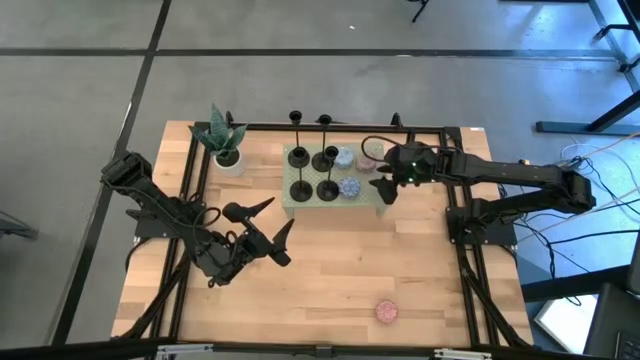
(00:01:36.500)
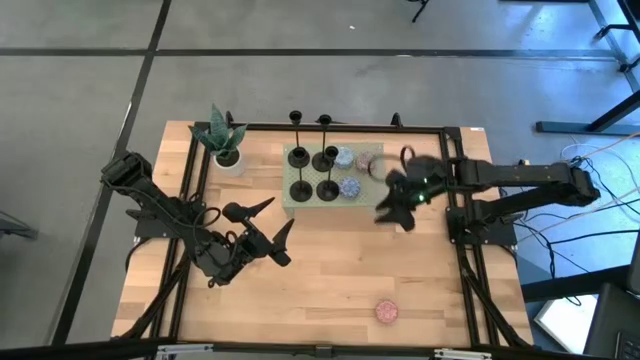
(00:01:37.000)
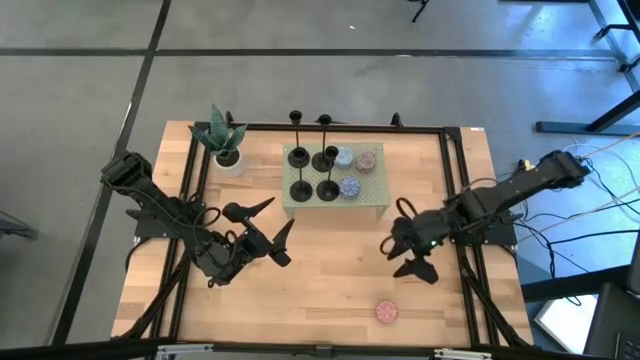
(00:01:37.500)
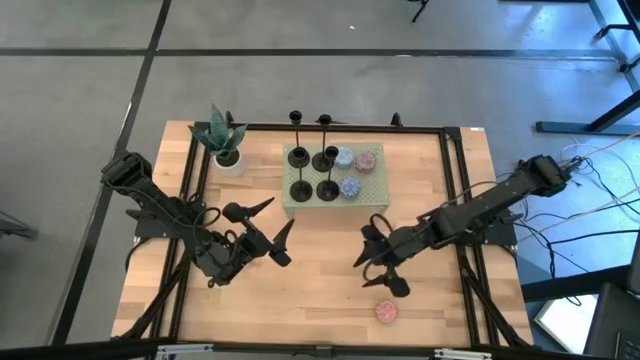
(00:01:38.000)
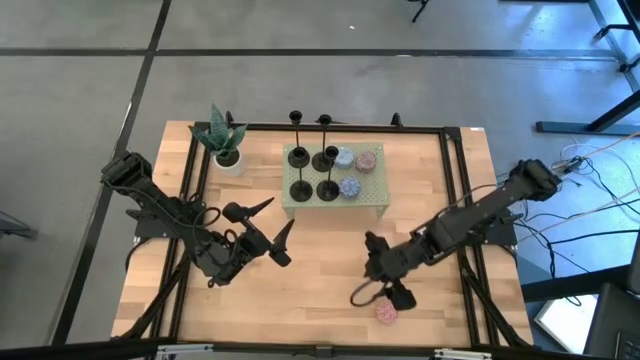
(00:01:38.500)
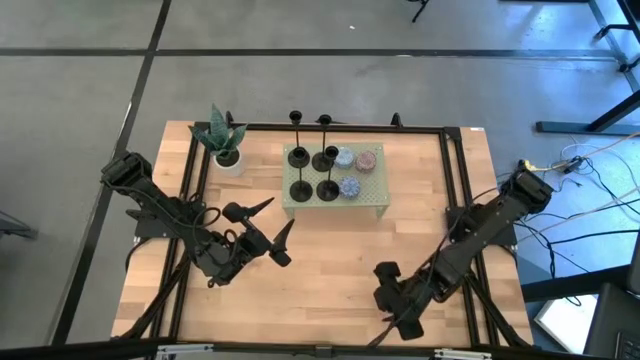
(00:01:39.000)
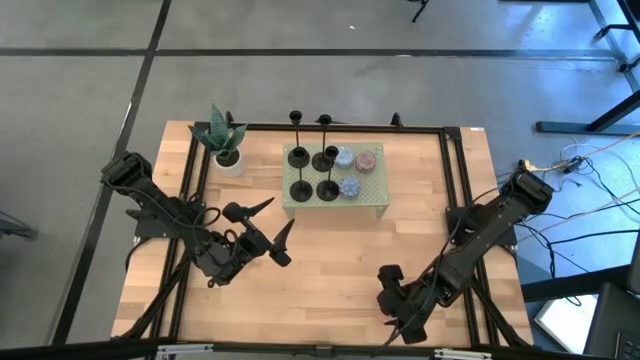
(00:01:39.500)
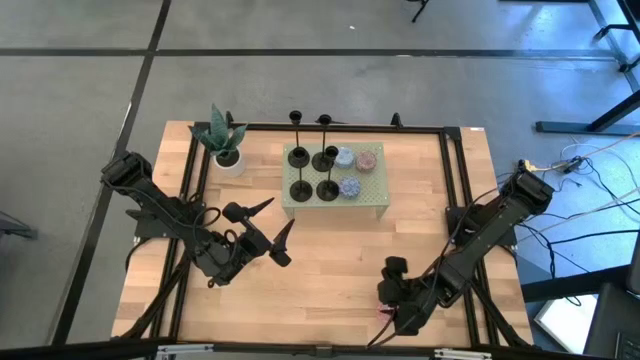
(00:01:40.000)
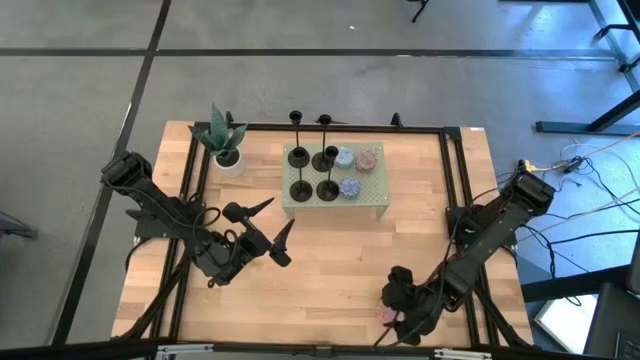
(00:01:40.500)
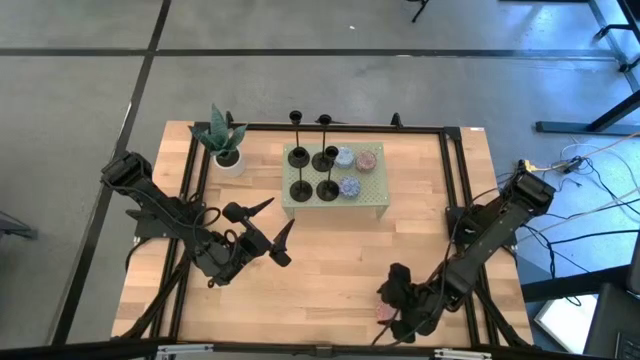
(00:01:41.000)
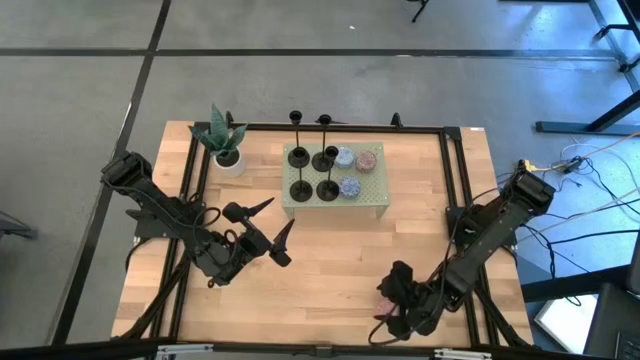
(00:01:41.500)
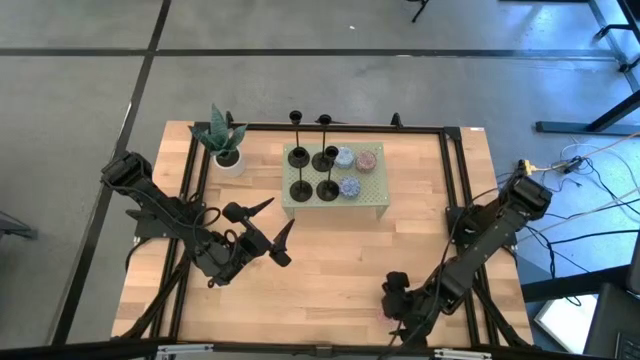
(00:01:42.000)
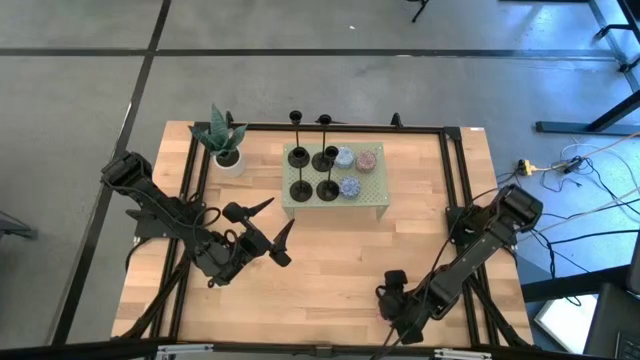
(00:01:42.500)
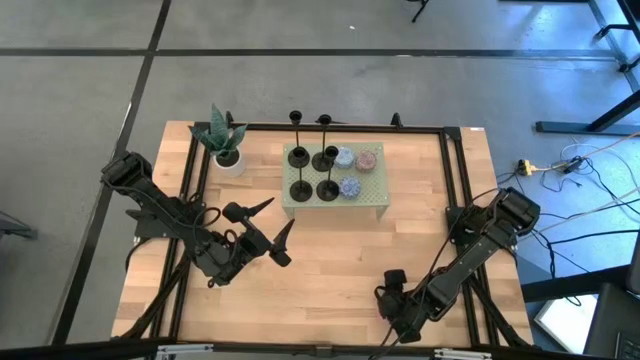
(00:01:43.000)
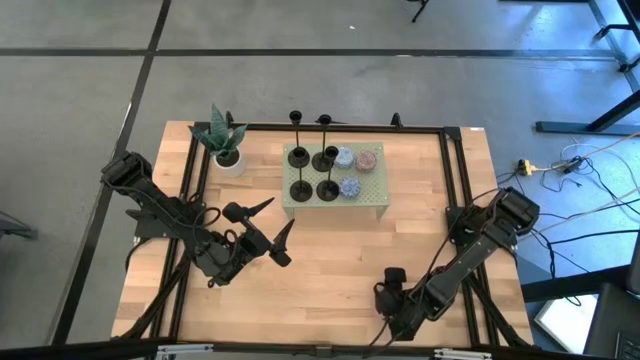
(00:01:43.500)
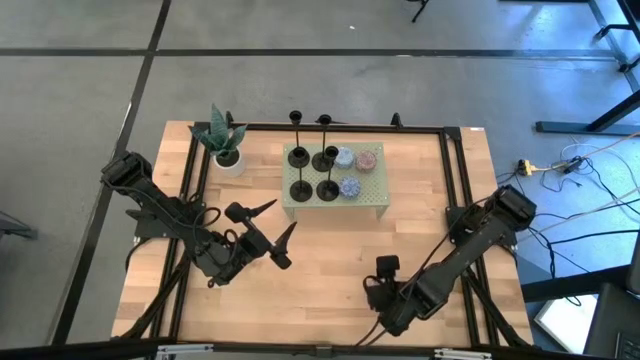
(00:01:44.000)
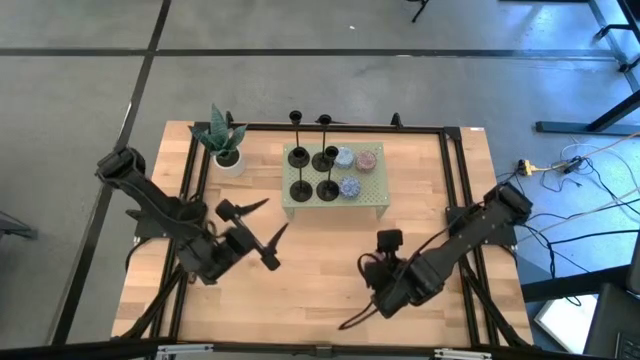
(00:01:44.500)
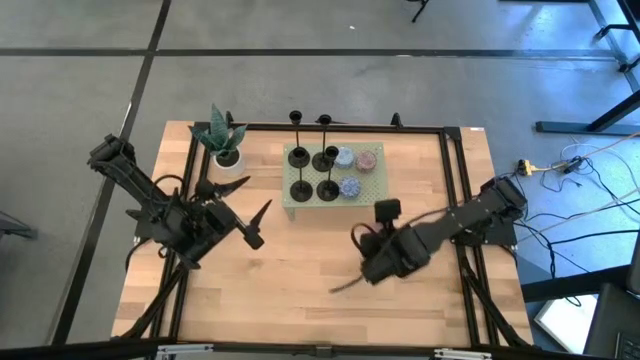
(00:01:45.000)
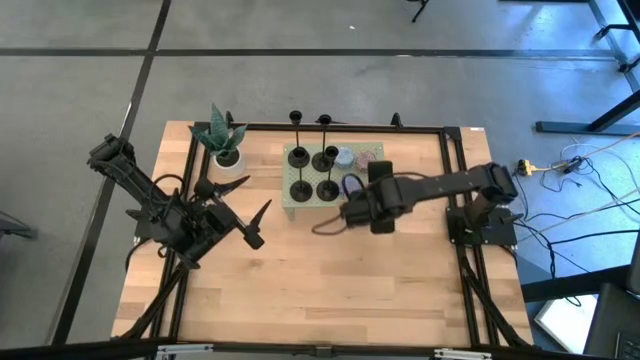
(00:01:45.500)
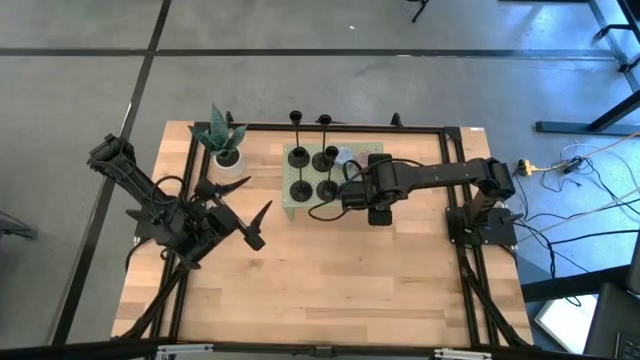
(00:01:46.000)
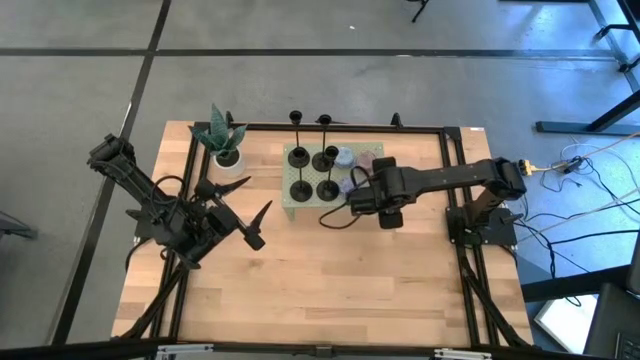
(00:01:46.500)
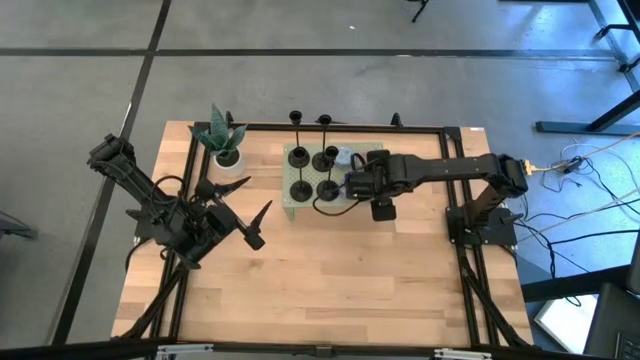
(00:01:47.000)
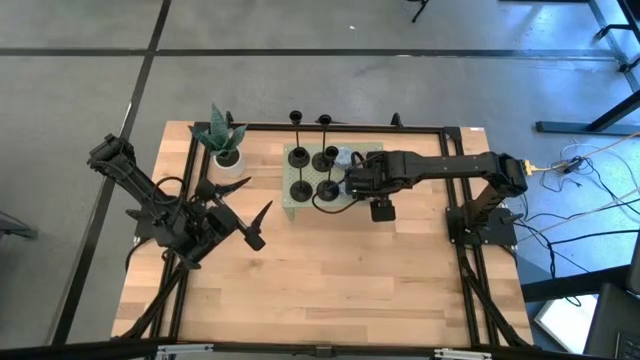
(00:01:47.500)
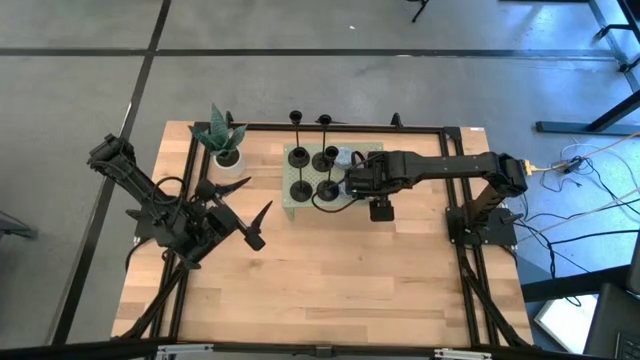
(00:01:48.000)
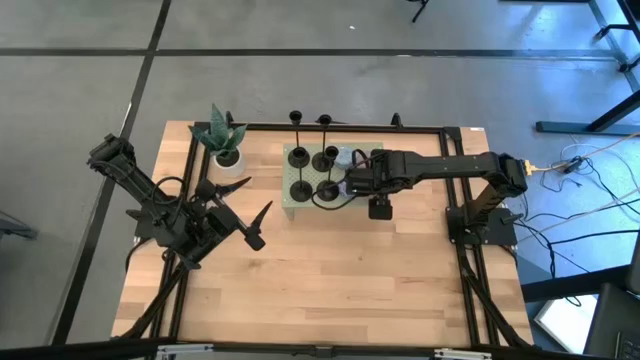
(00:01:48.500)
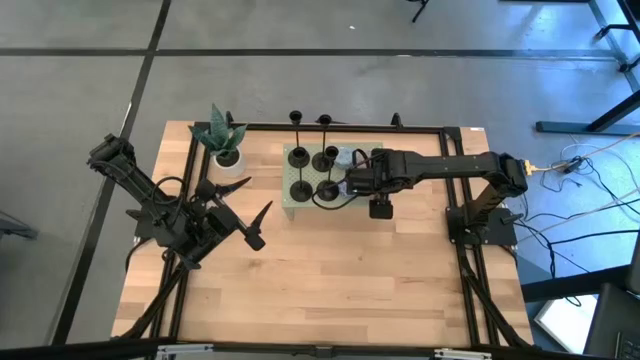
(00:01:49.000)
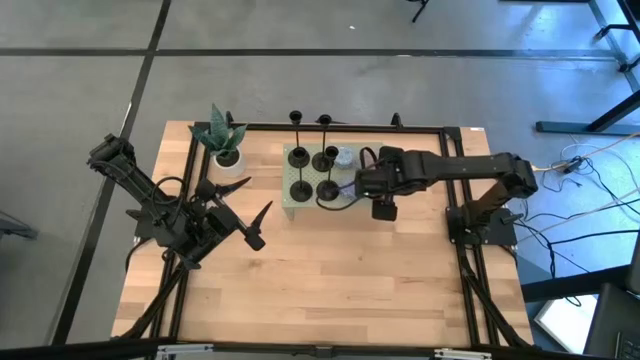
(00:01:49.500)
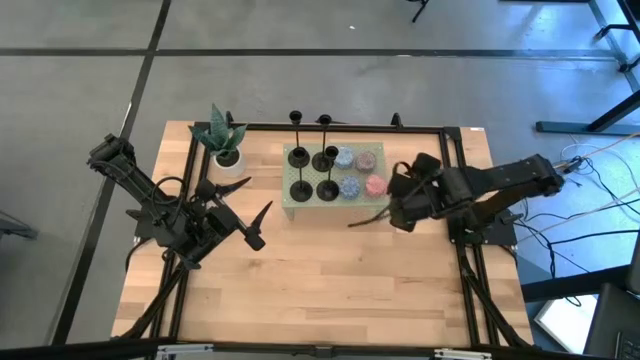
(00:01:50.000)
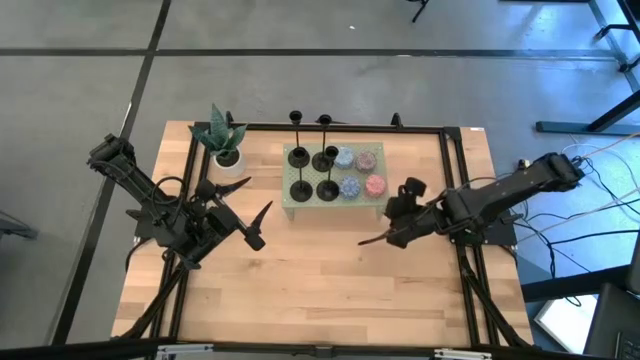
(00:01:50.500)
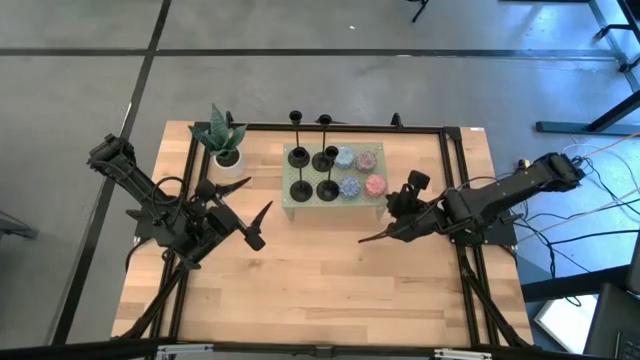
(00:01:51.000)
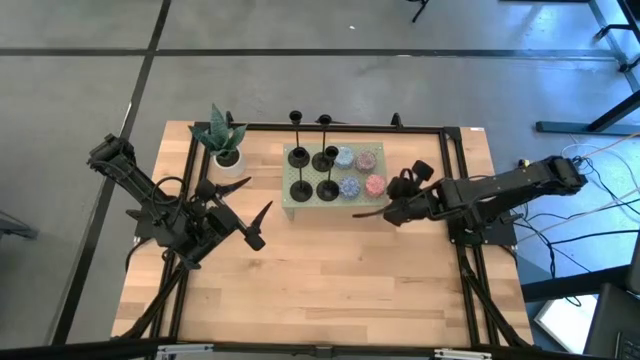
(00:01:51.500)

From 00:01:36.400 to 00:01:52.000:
Task: Pick & Place candle stick holders
Align the pink scented candle with the red scented candle on the shelf

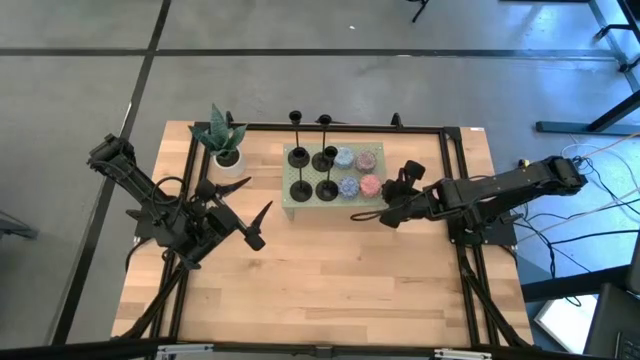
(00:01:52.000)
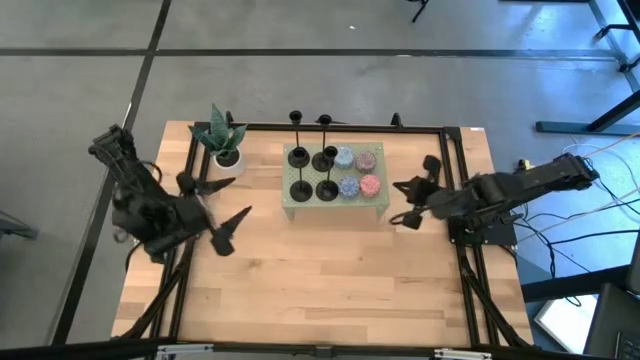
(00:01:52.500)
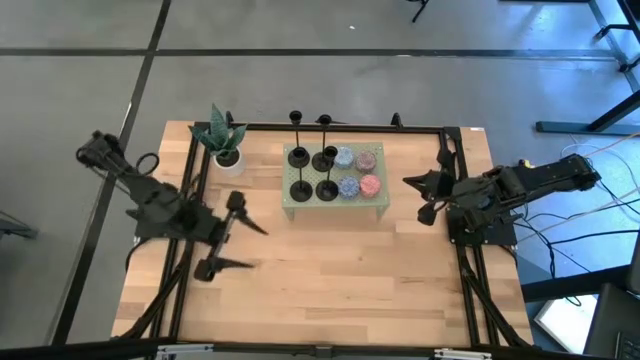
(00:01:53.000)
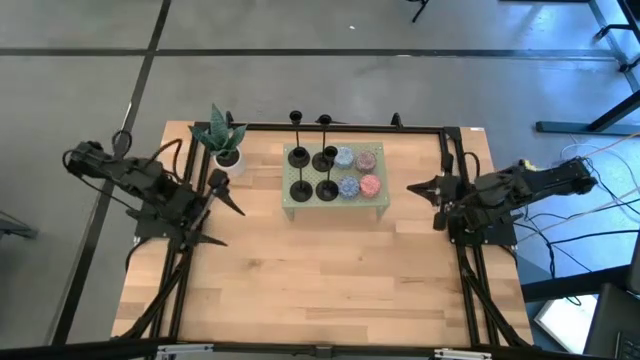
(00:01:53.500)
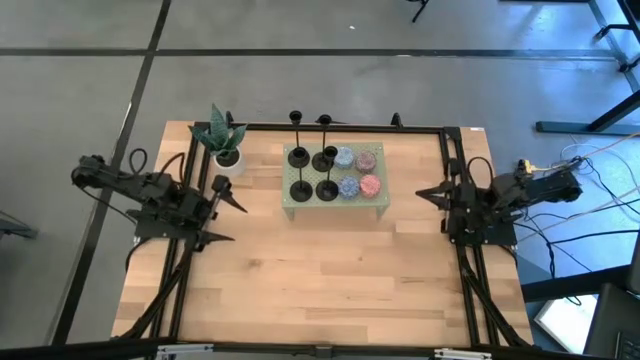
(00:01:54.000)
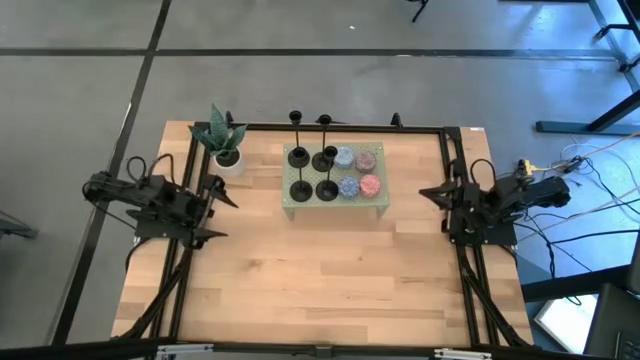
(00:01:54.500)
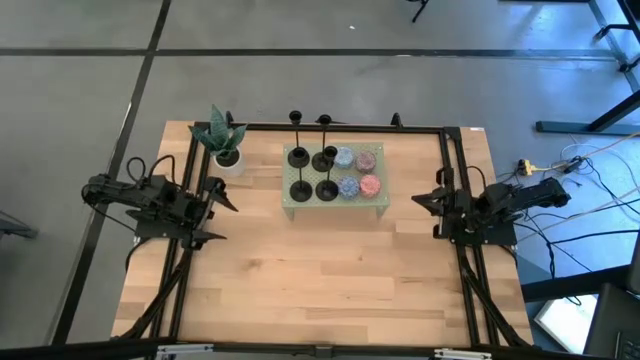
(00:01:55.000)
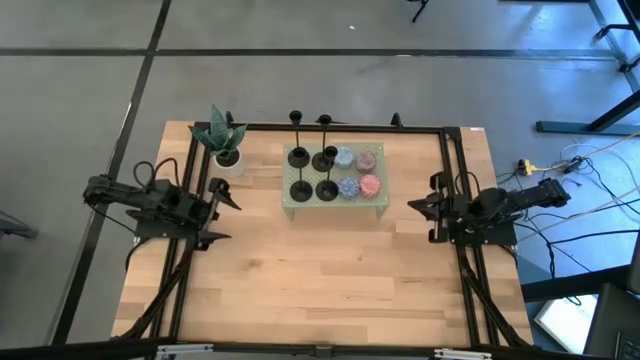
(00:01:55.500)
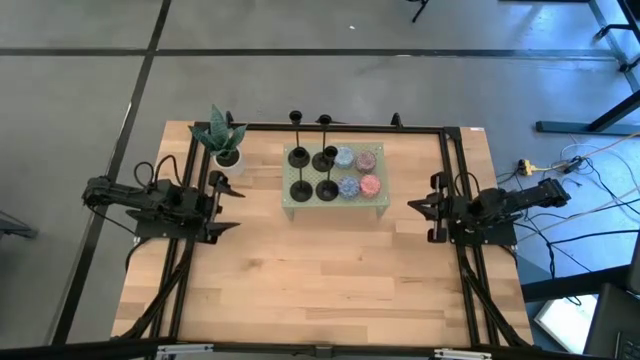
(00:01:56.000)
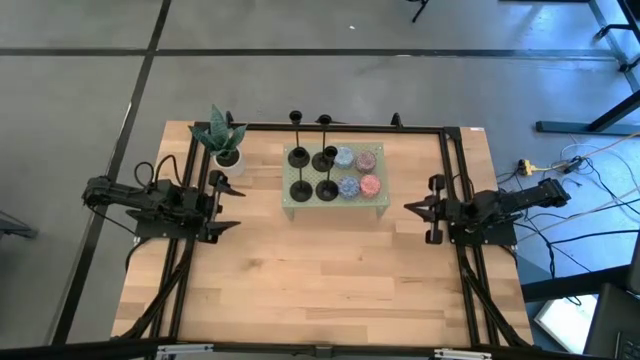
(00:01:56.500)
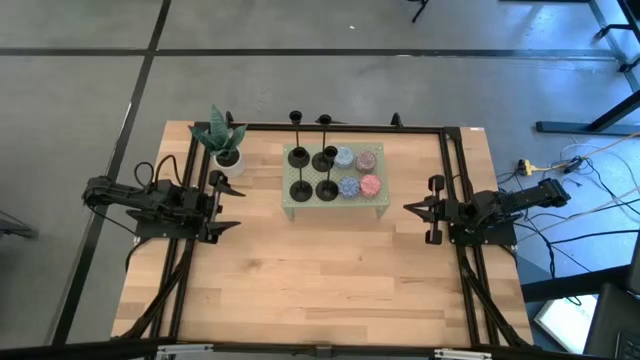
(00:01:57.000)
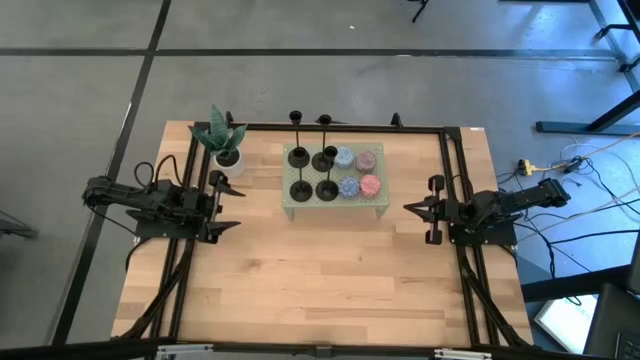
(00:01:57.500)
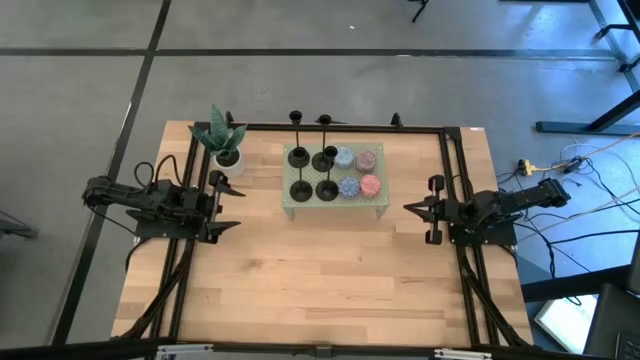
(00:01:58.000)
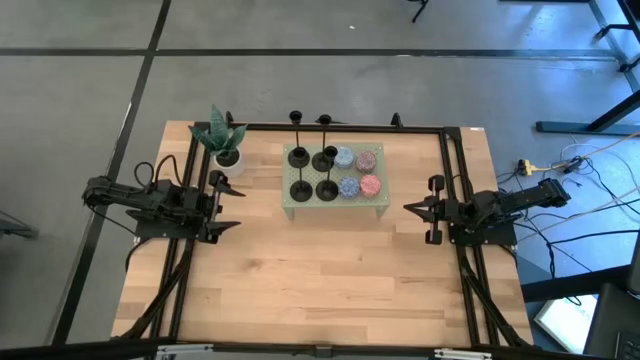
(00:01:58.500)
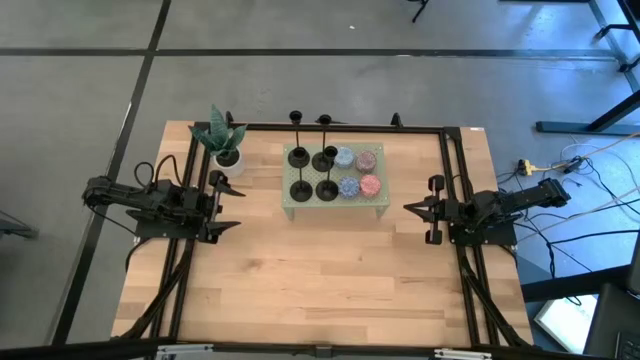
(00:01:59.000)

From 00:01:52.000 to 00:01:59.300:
Return to Home Position
